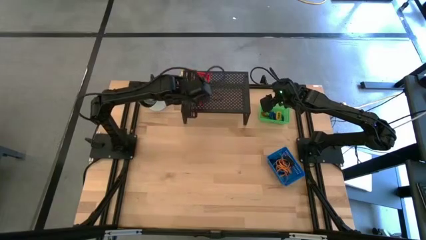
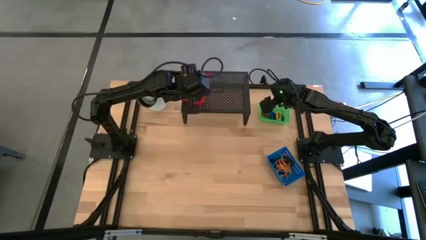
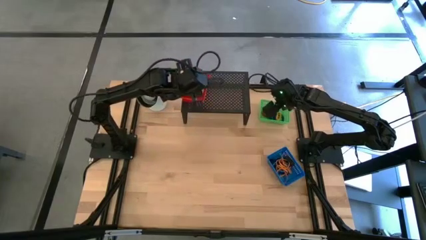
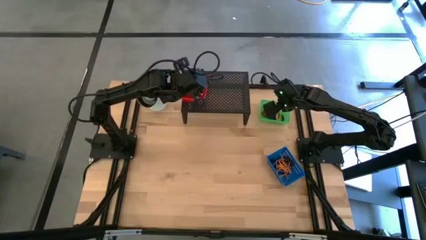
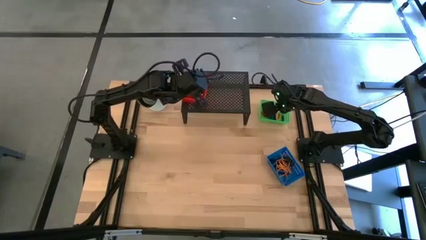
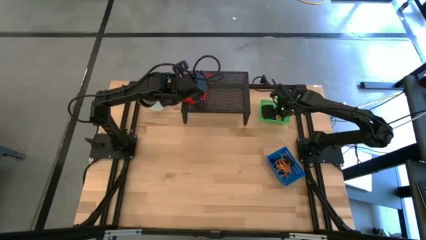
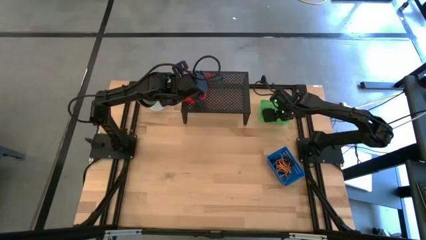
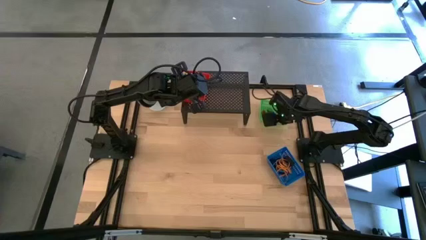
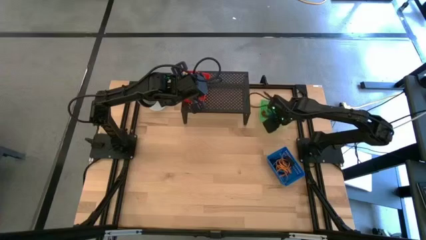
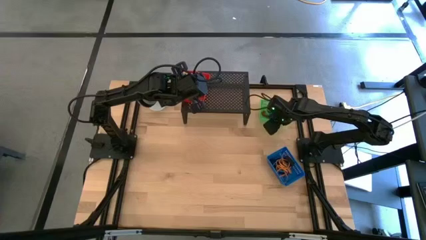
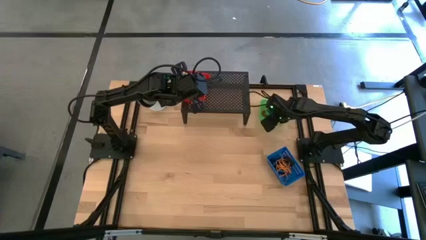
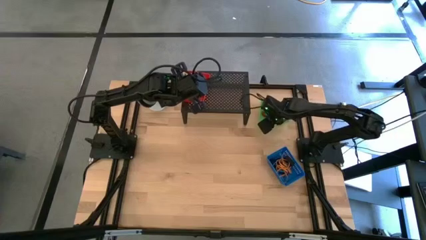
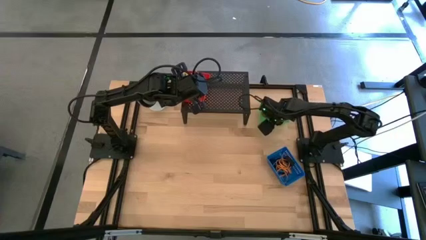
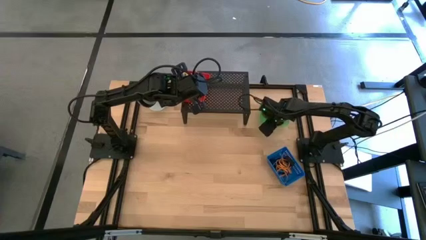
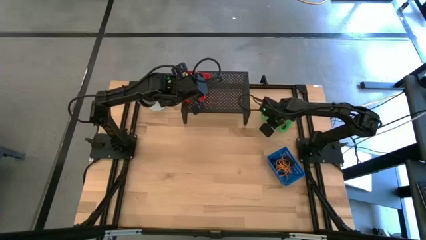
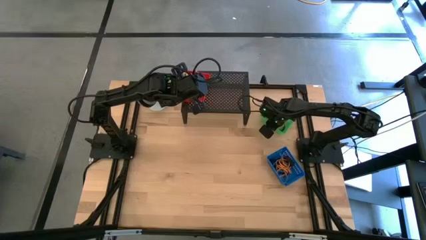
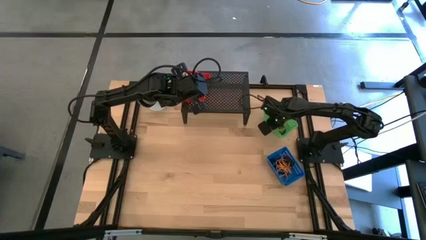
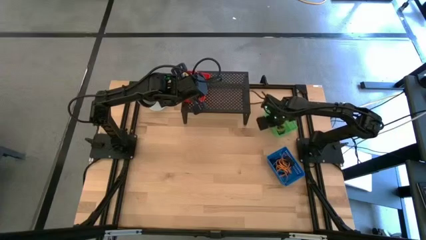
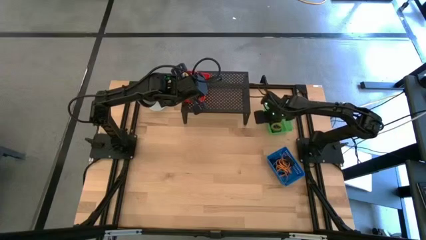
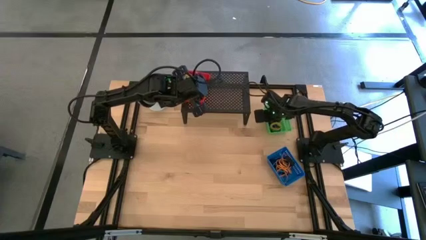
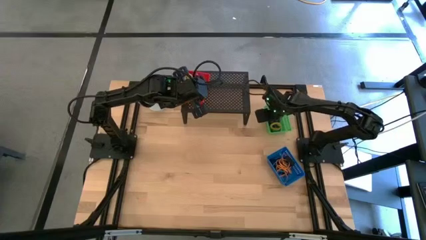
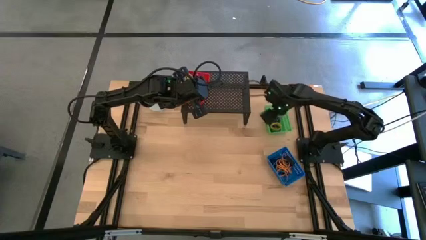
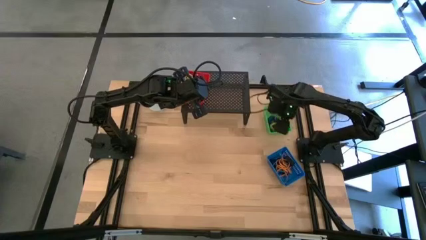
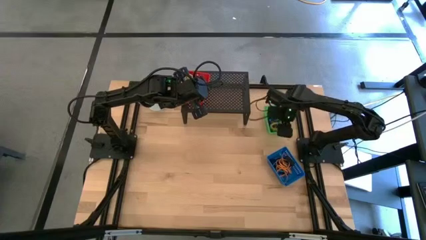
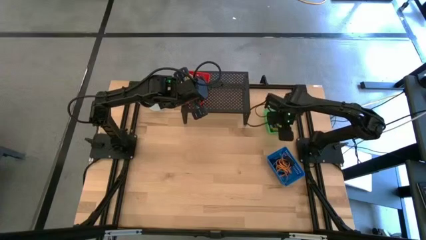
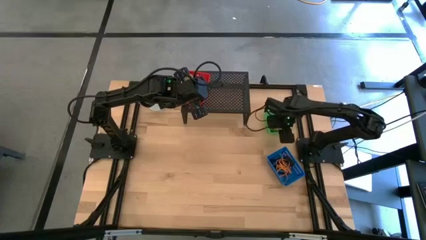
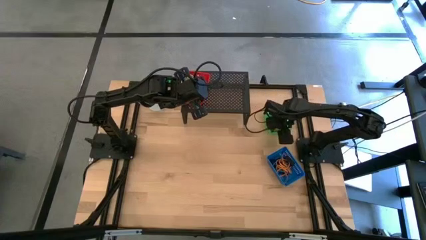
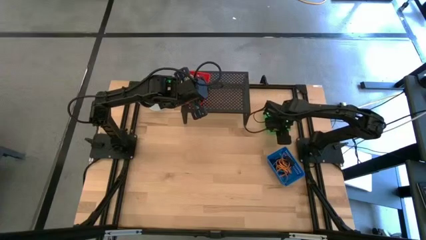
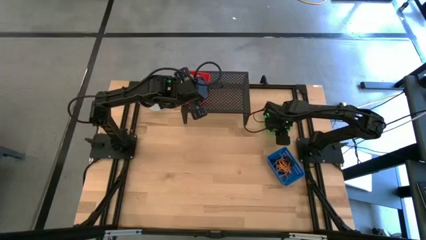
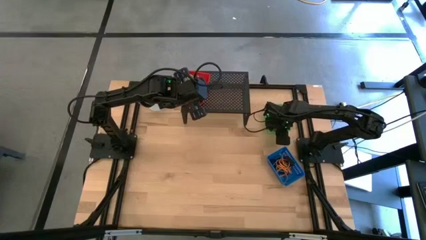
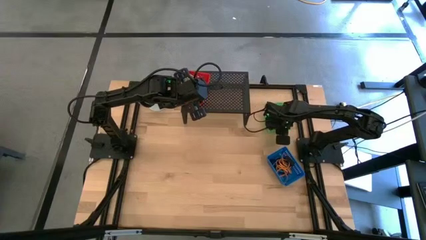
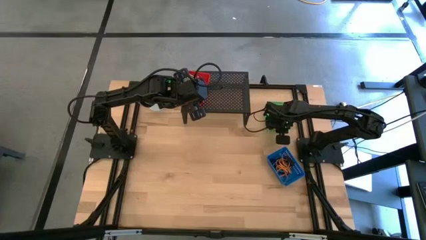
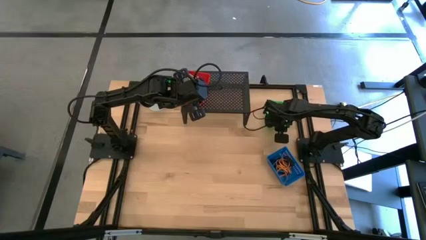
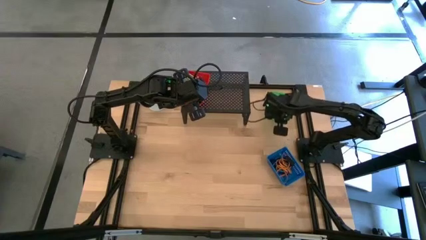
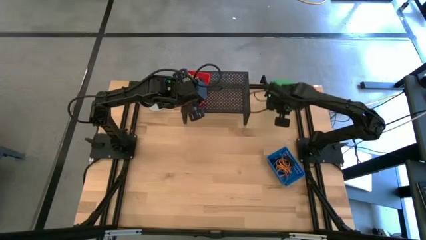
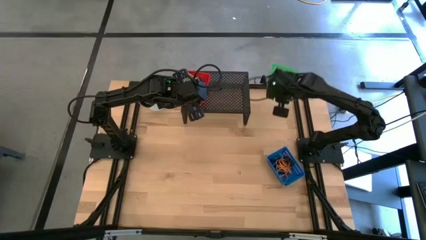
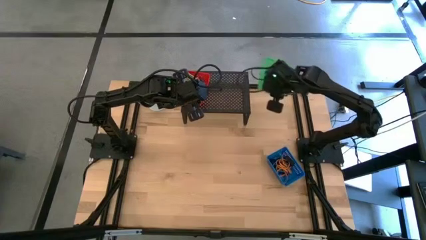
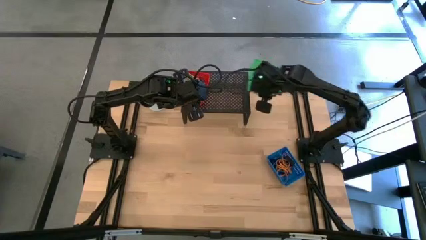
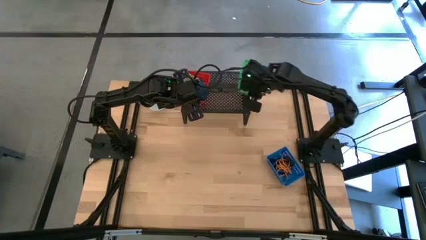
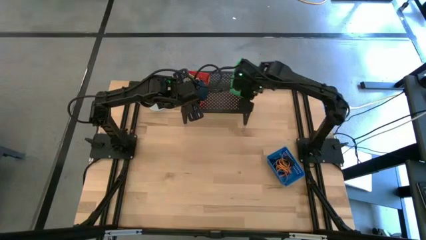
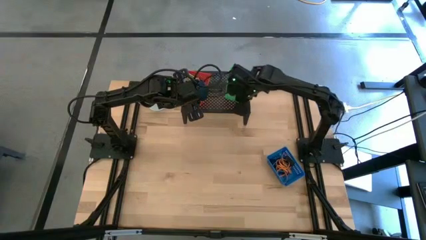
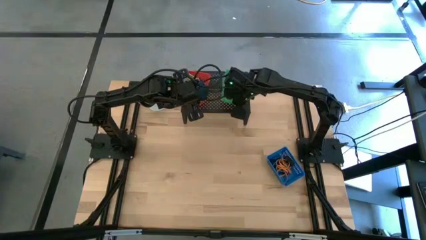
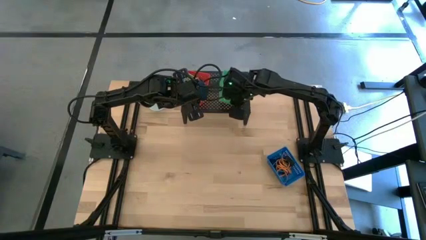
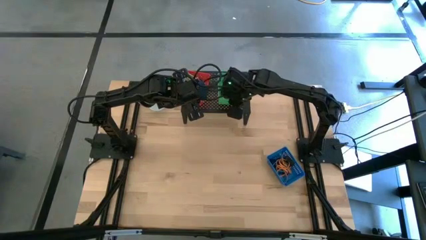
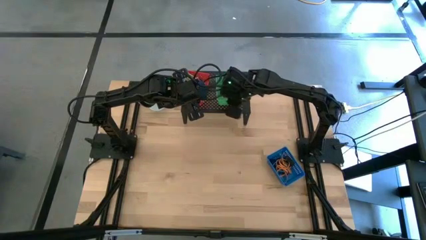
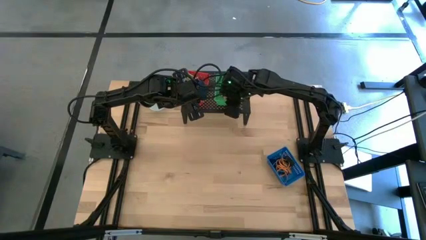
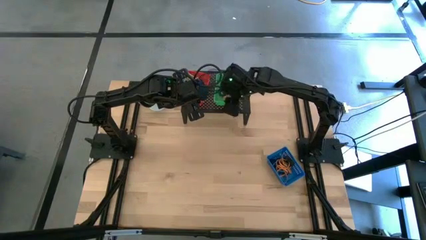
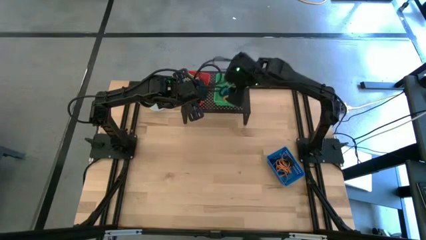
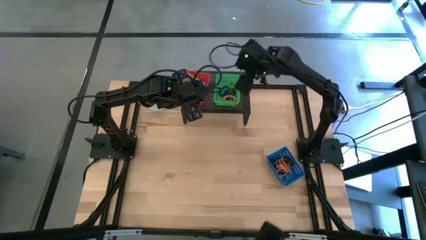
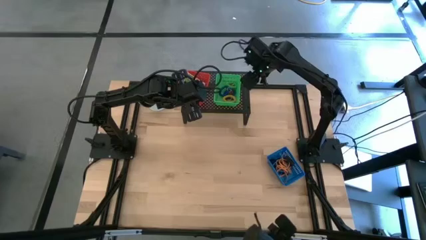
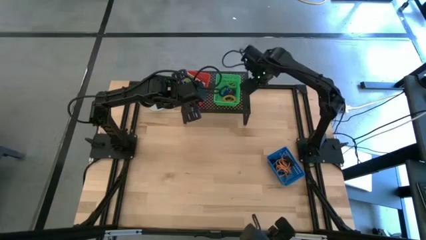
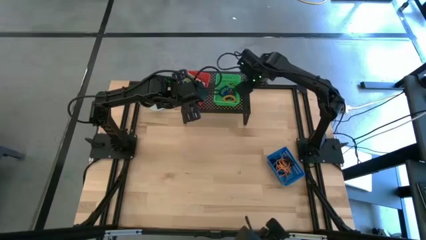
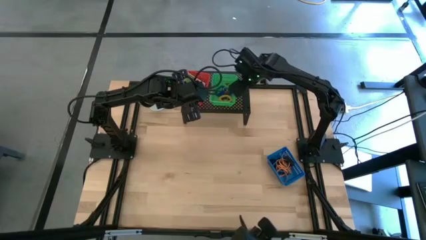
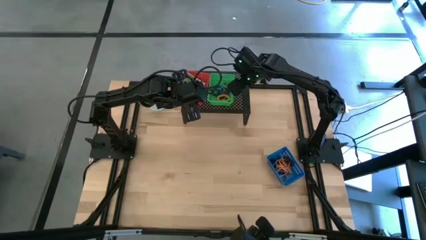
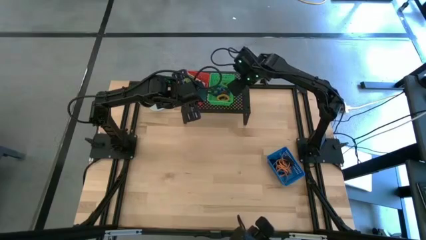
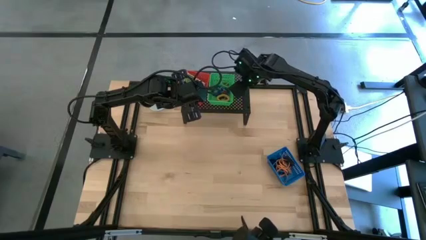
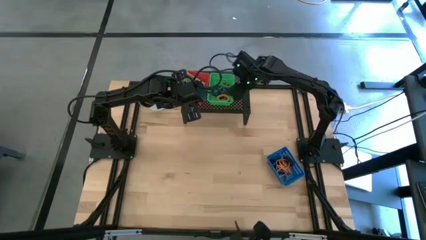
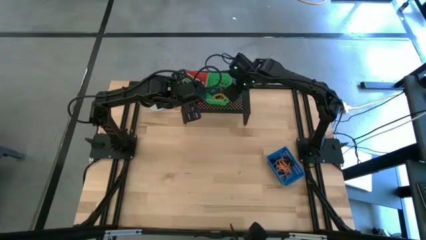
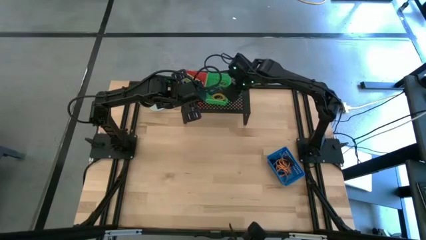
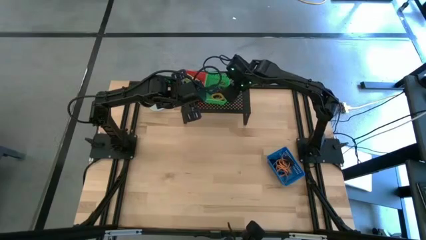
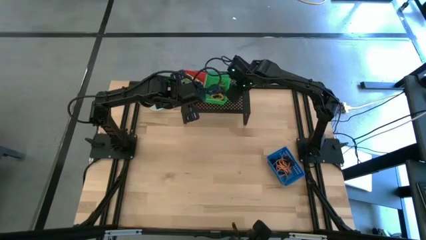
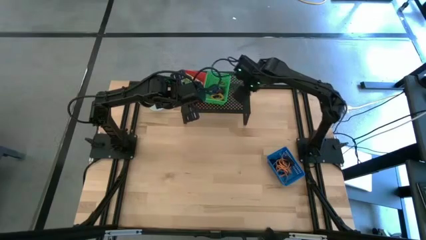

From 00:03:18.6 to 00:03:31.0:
Task: Pick & Place Office Desk Supplies
Put the green bin on the shelf
